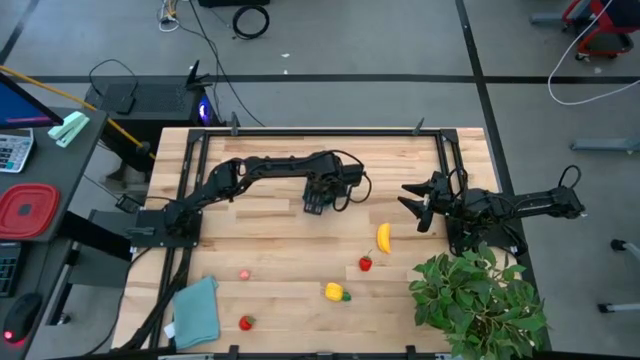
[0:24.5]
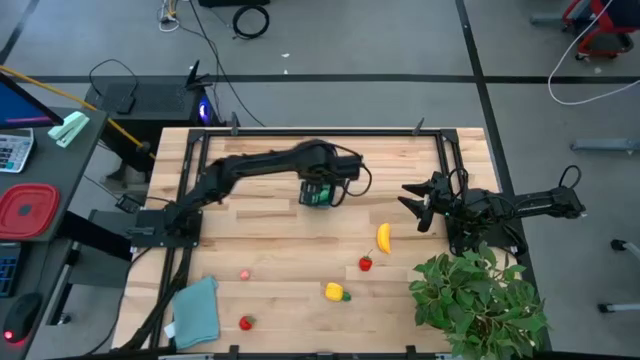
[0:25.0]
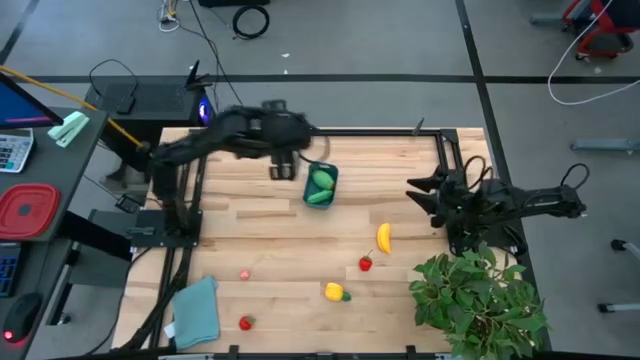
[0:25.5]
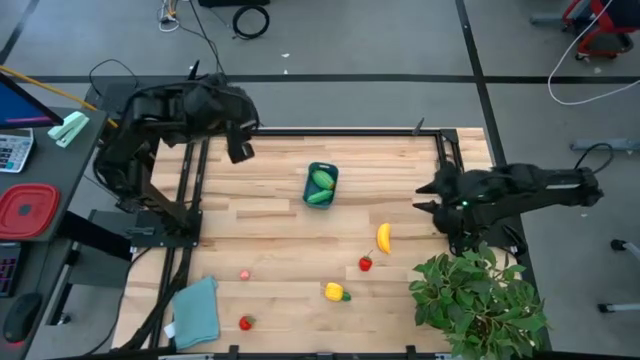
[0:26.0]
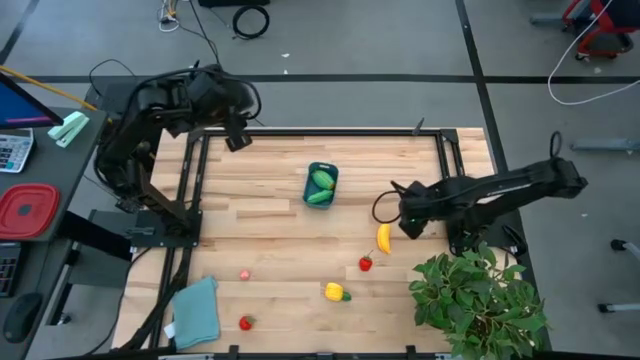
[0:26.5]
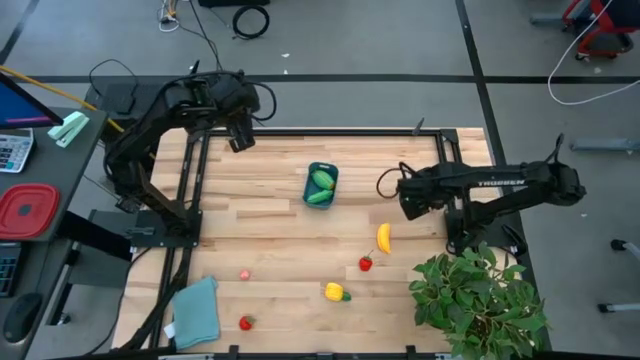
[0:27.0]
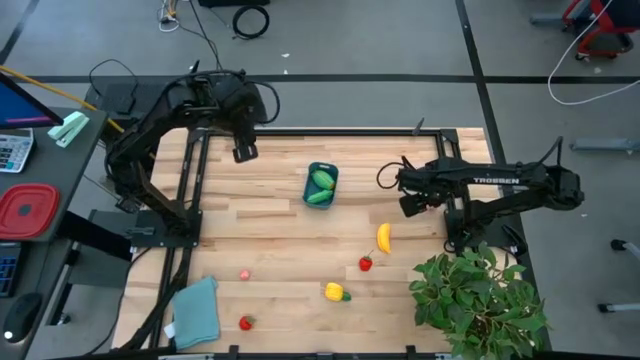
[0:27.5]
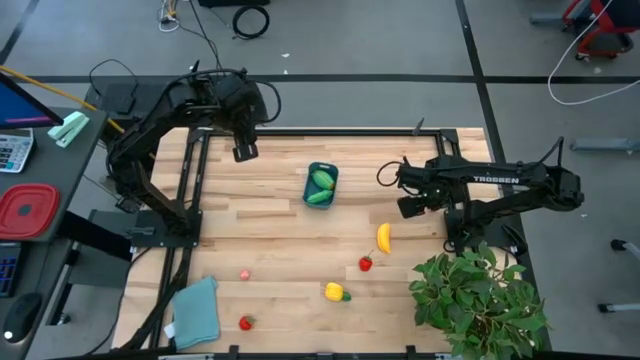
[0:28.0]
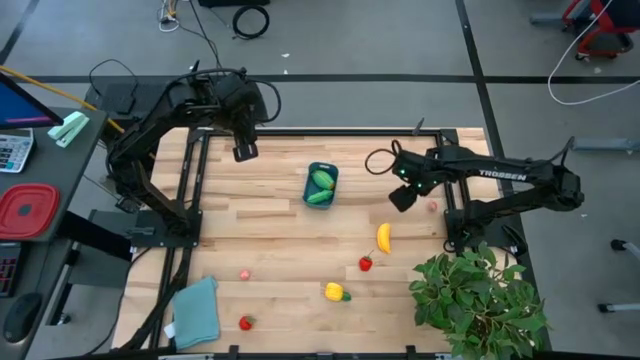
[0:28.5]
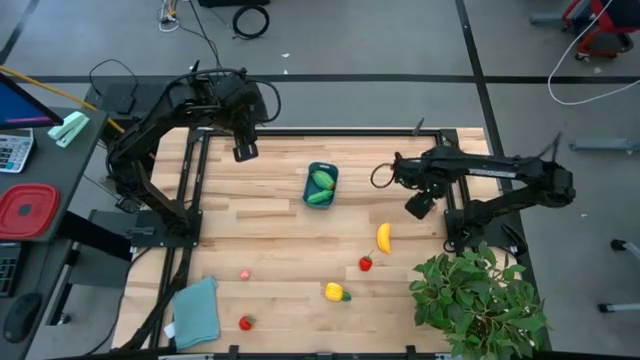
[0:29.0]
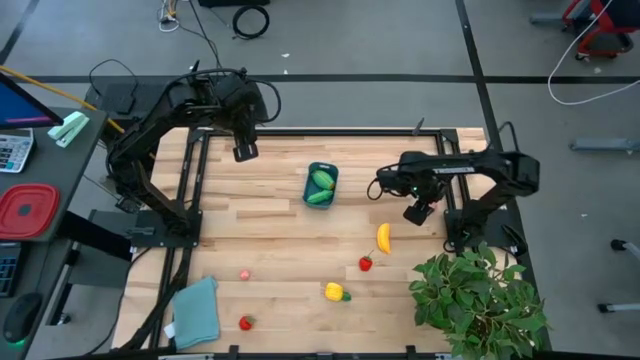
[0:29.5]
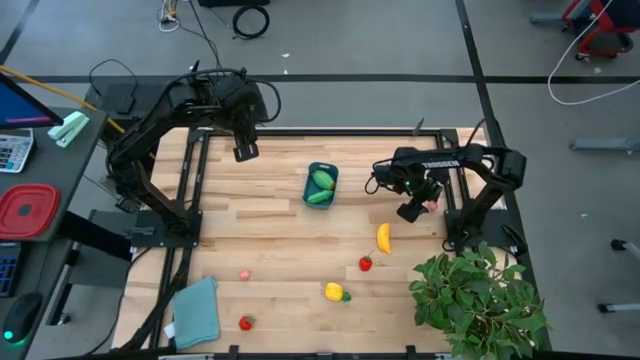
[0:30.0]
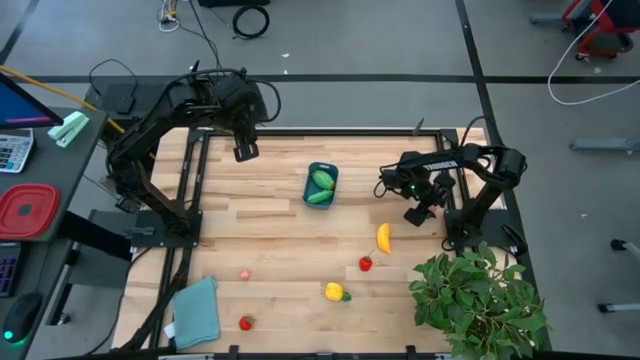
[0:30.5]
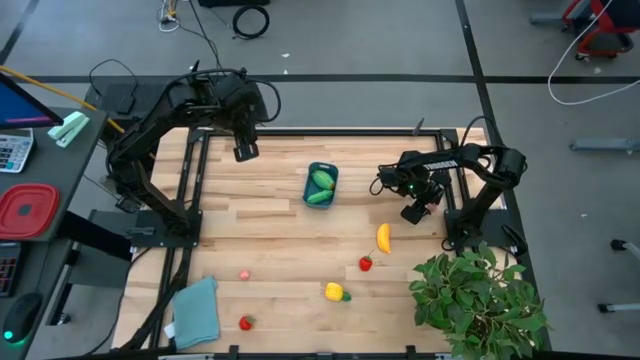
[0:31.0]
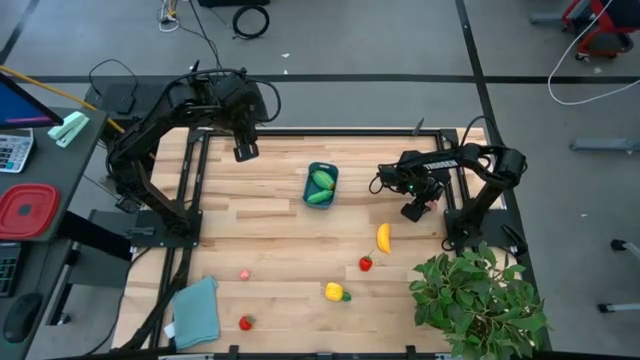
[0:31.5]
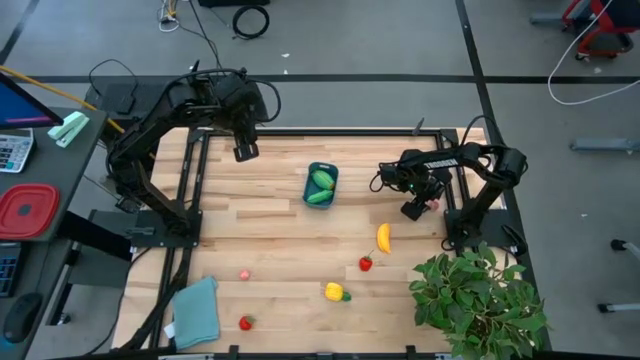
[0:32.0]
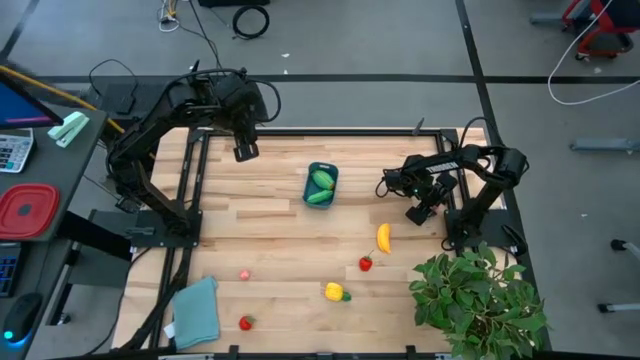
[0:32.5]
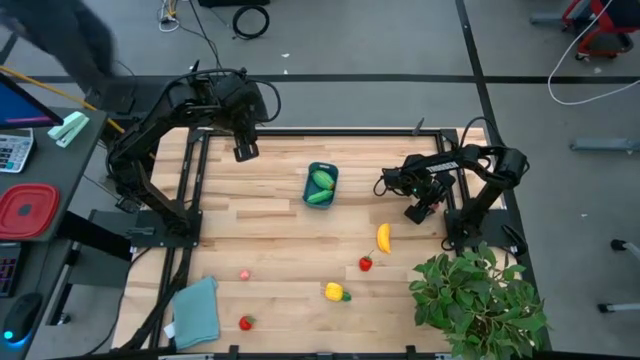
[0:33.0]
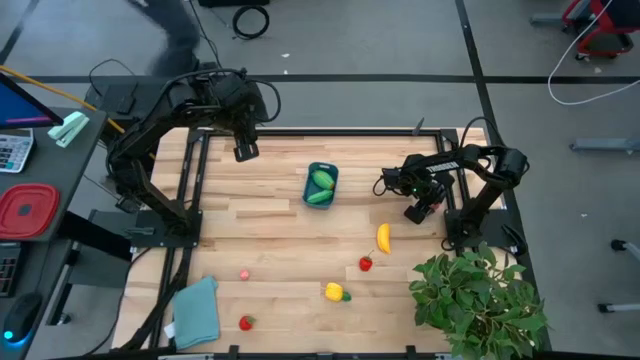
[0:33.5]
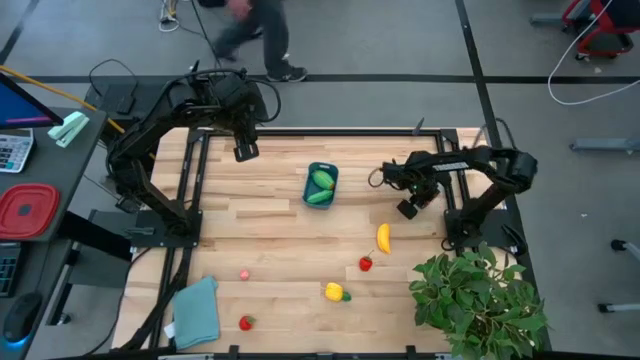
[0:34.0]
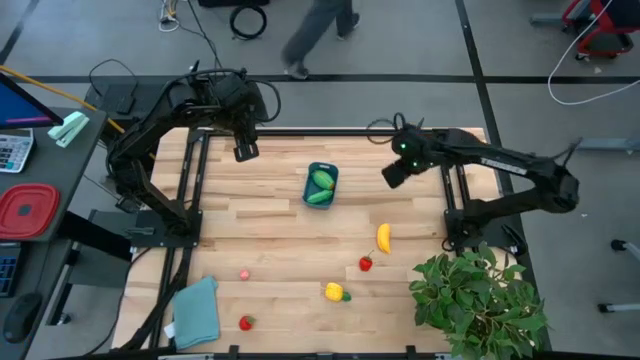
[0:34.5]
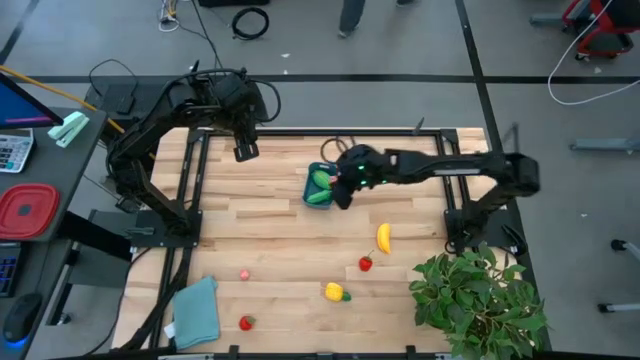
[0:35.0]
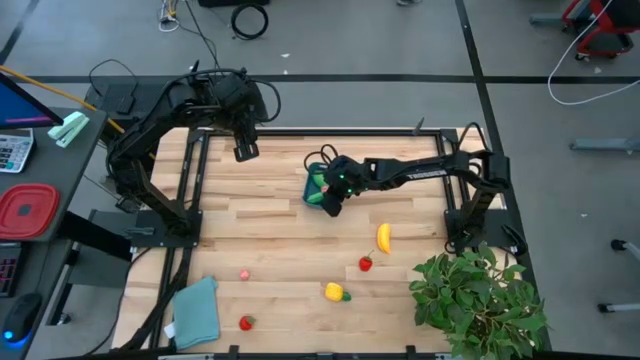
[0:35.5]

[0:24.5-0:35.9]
Task: Pick and placing Produce into tupperware
Put the top pink peach into the blue bin

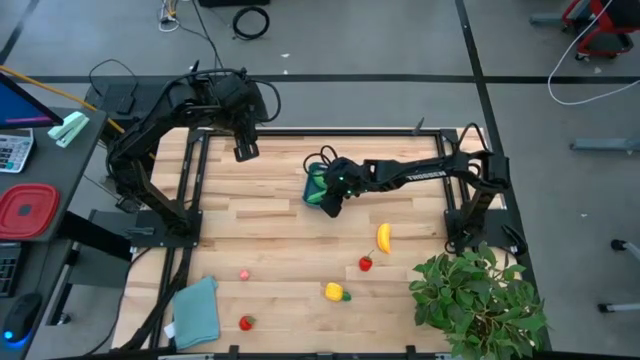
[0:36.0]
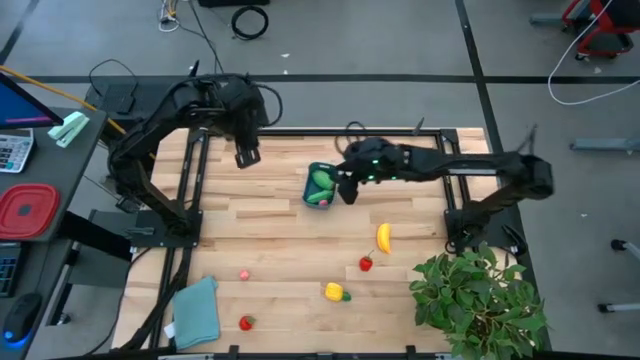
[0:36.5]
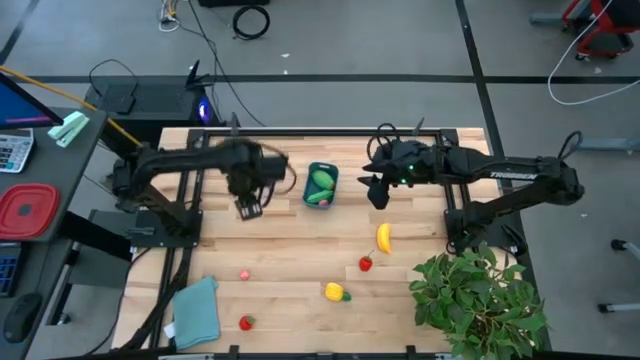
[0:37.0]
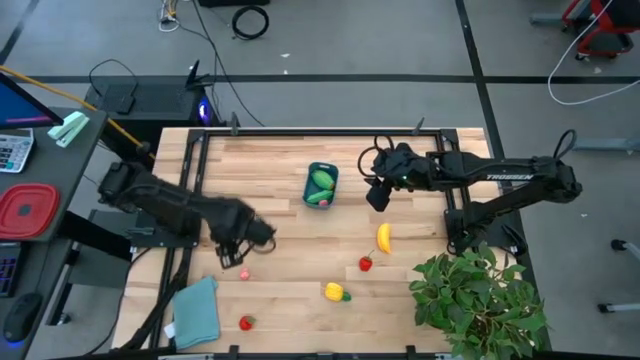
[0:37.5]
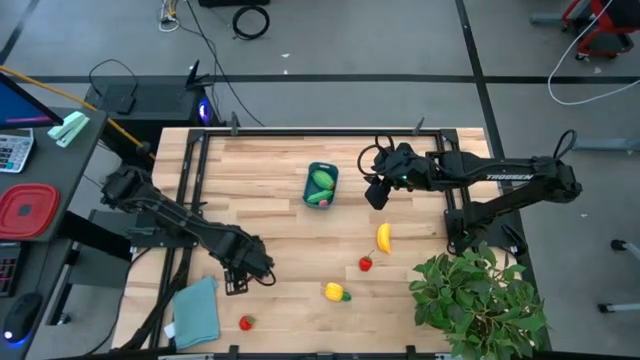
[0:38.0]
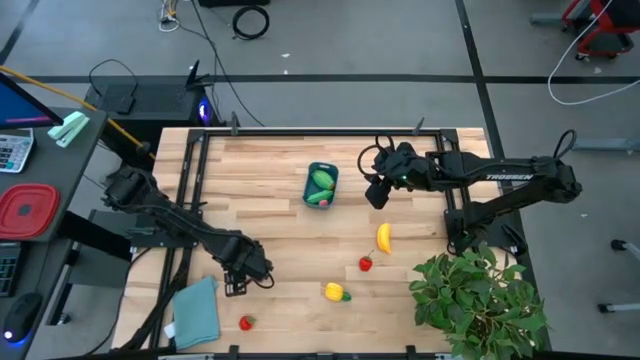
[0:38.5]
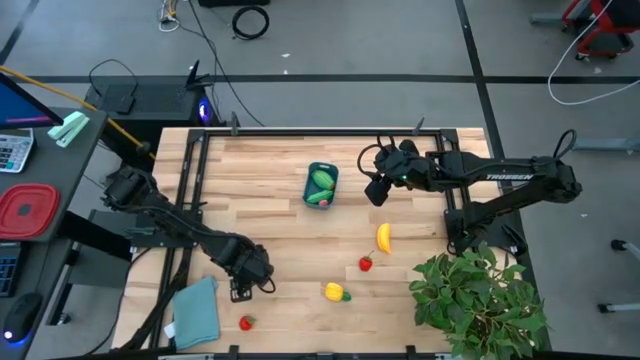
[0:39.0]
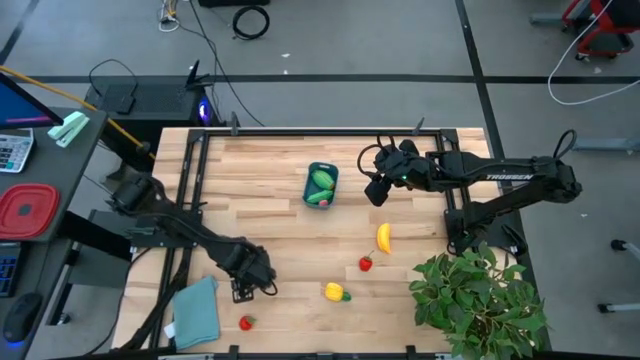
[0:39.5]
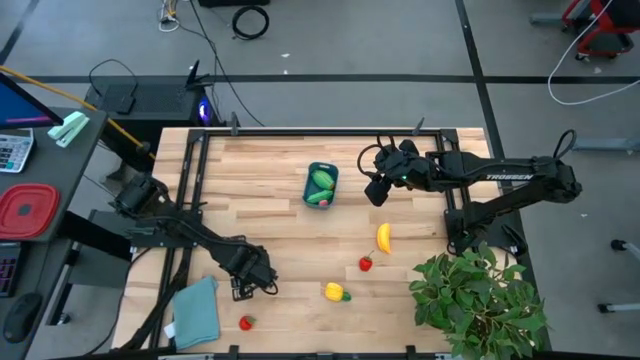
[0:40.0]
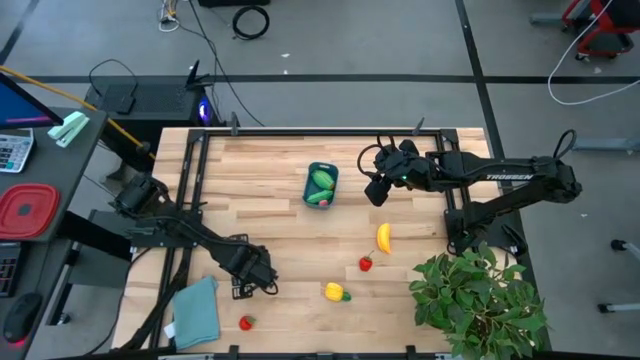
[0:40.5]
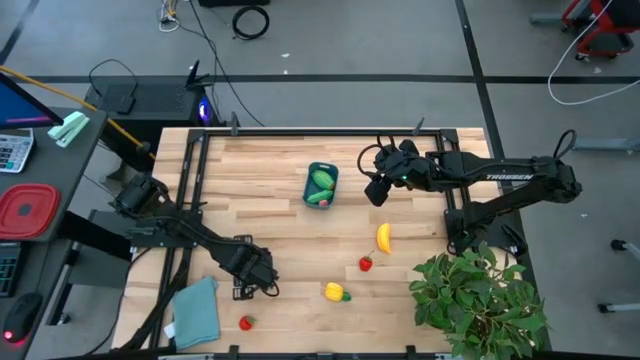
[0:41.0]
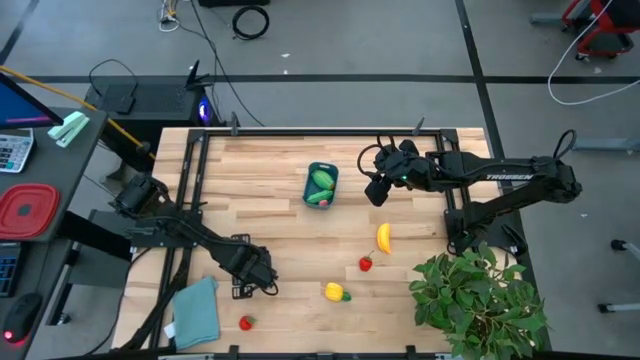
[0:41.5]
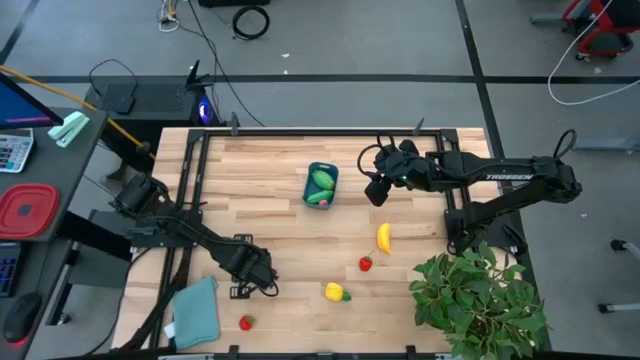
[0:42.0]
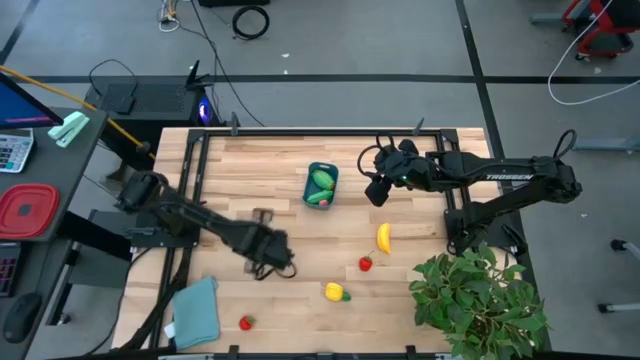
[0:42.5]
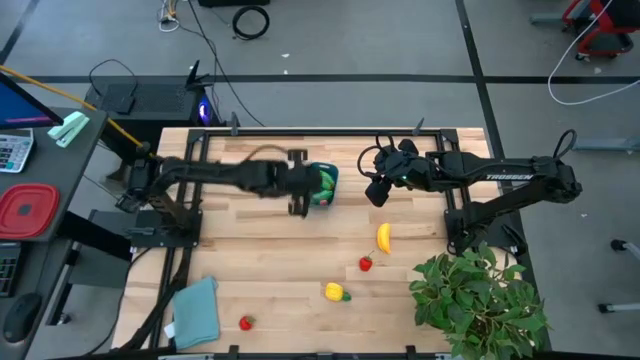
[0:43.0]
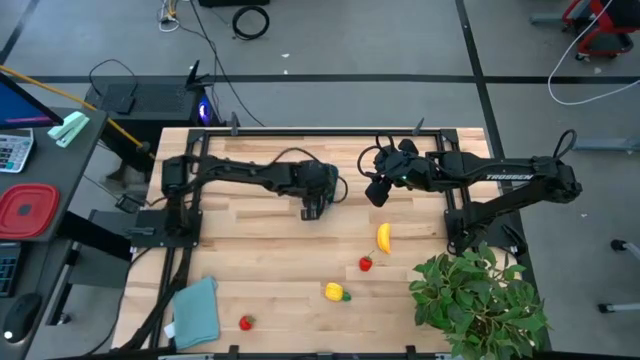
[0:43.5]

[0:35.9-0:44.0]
Put the pink peach into the blue bin

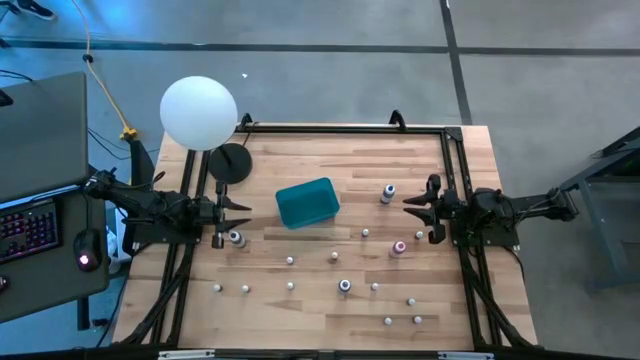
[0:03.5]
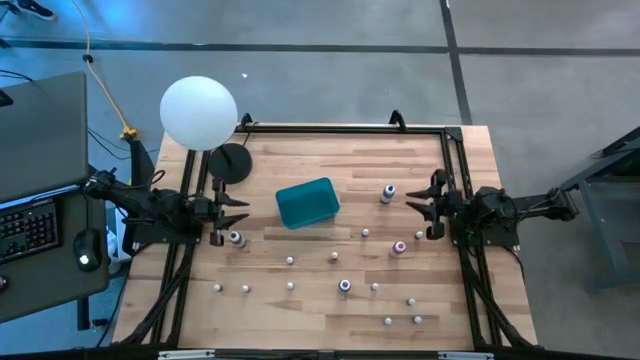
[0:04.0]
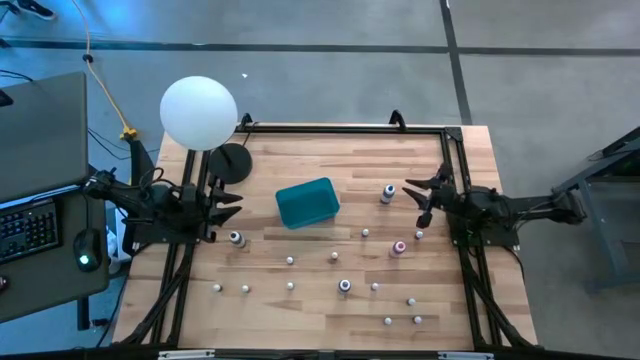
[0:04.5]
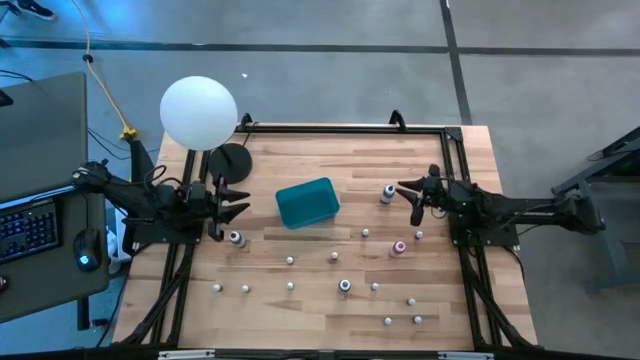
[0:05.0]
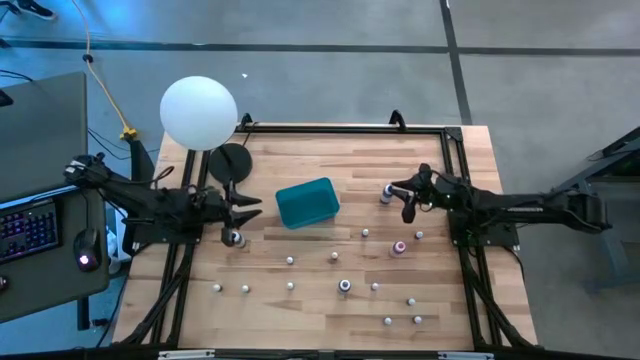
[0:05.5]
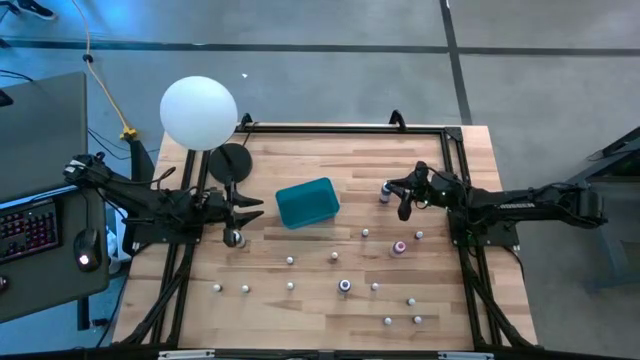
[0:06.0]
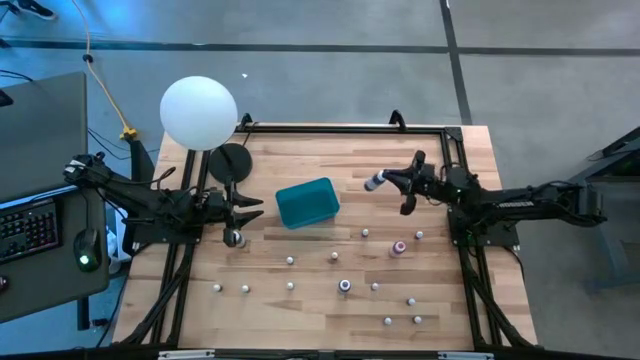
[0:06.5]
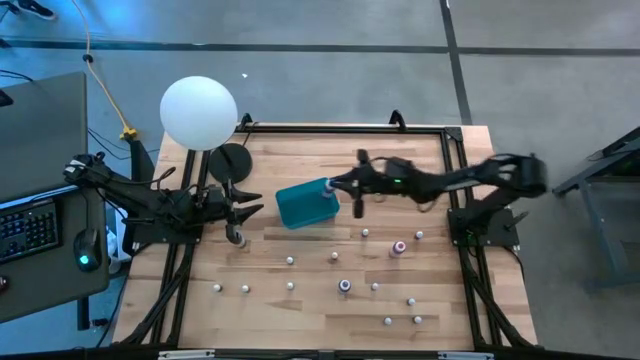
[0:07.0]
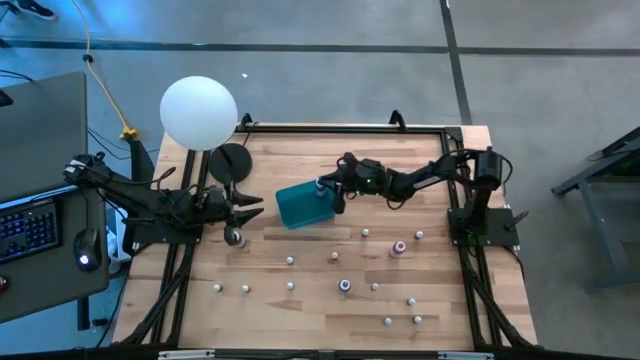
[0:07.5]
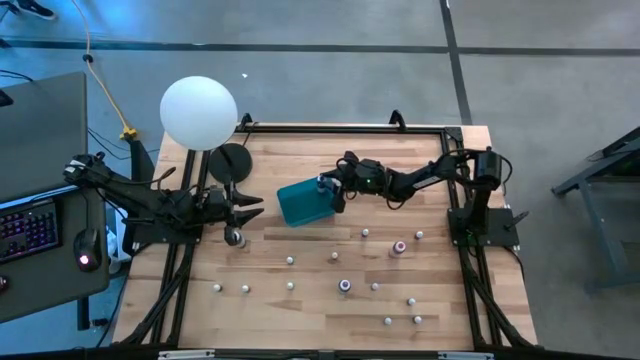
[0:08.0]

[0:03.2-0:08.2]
Task: Pick & Place food coloring
Put the big blue food coloring bottle into the blue bin
